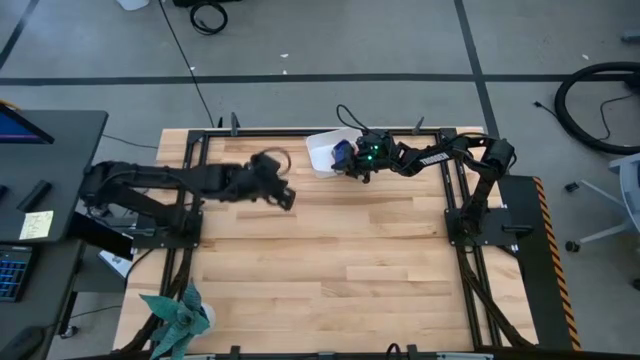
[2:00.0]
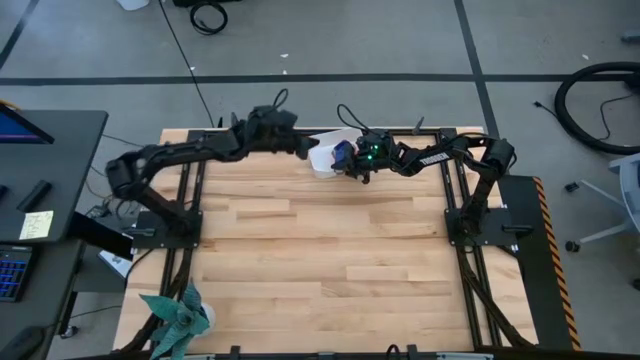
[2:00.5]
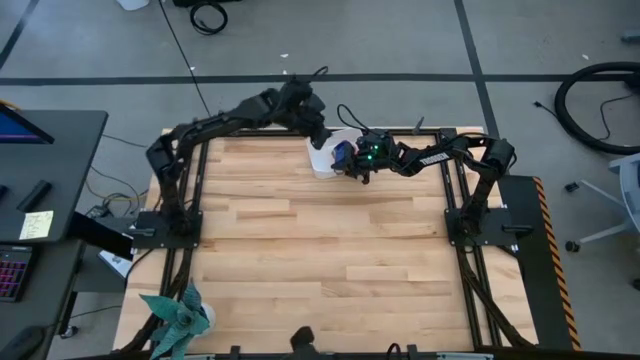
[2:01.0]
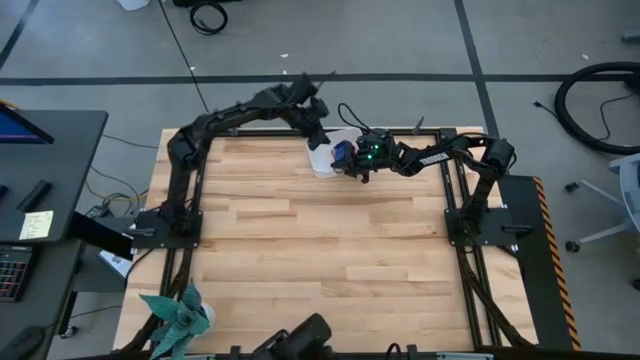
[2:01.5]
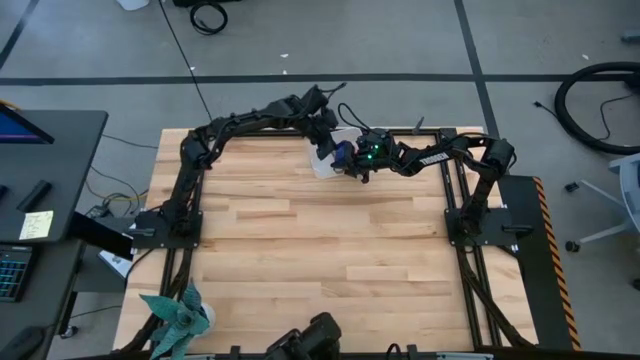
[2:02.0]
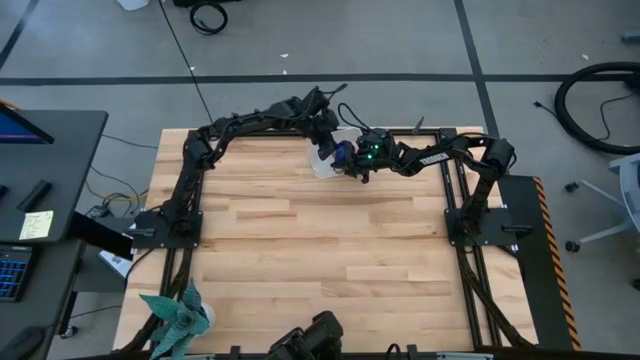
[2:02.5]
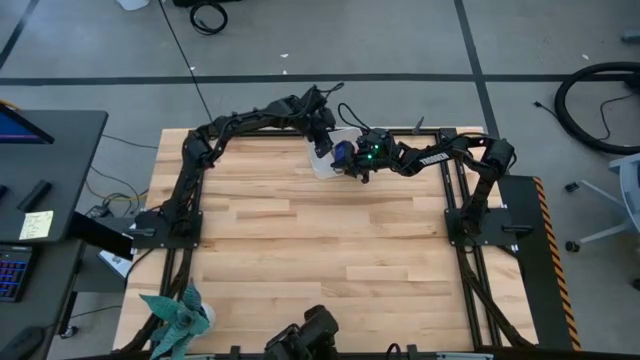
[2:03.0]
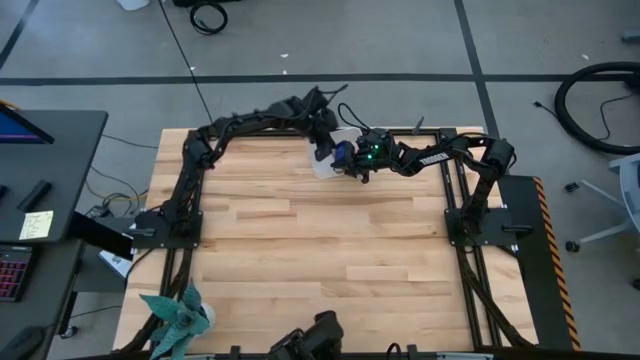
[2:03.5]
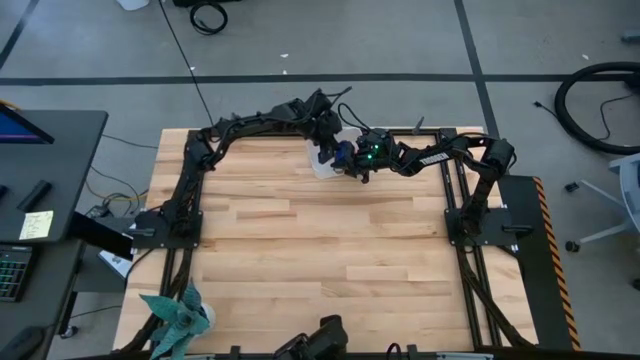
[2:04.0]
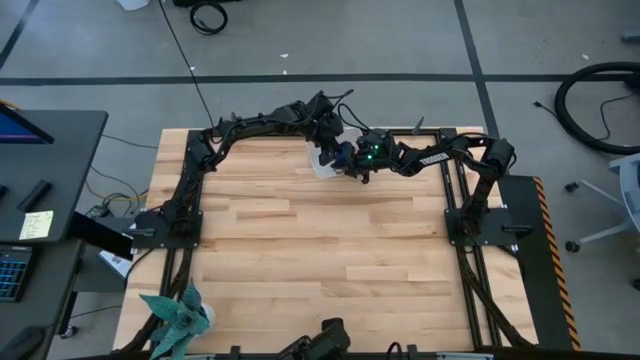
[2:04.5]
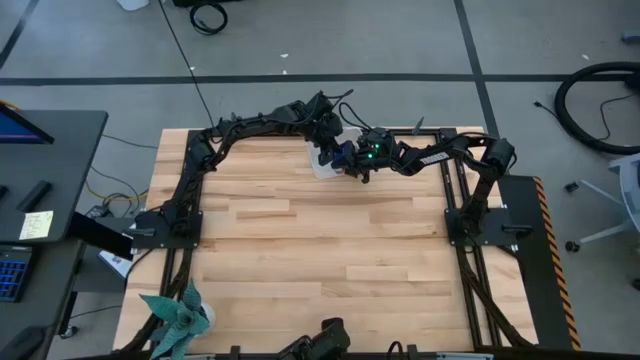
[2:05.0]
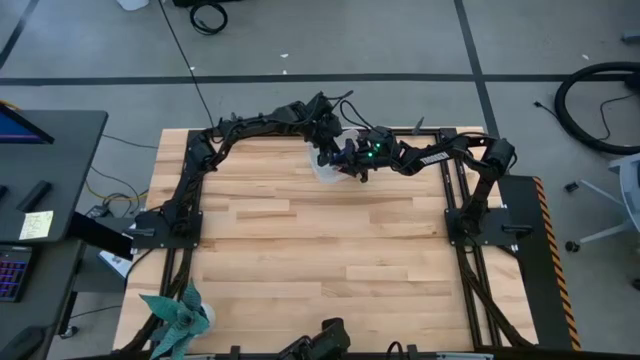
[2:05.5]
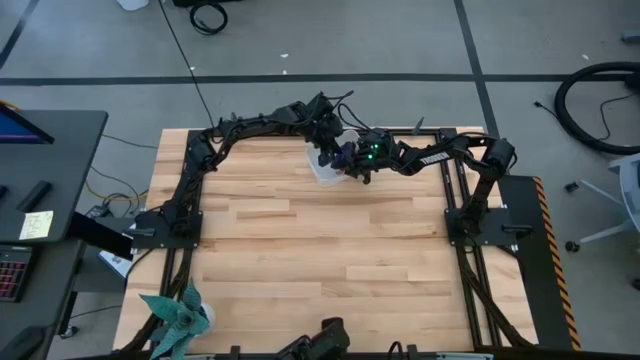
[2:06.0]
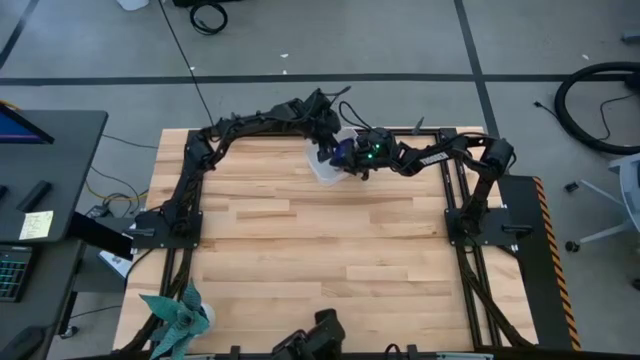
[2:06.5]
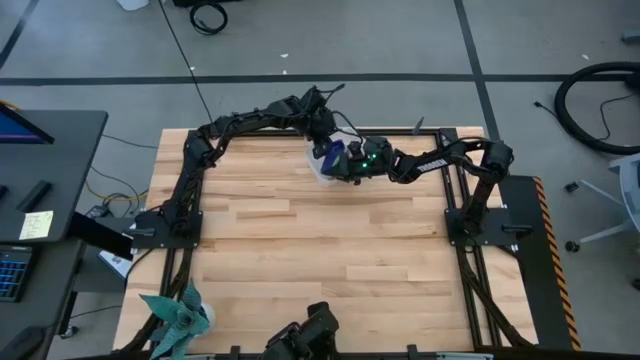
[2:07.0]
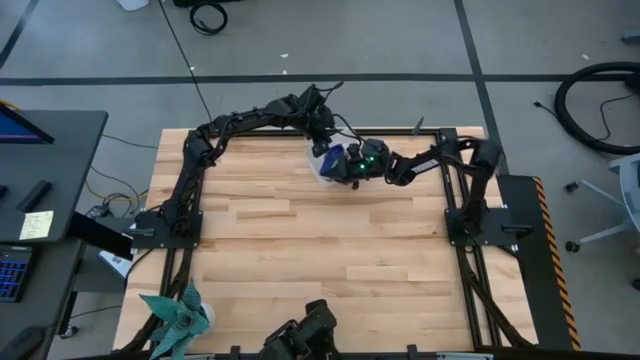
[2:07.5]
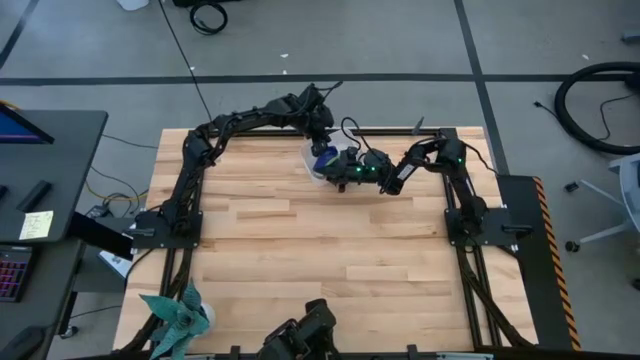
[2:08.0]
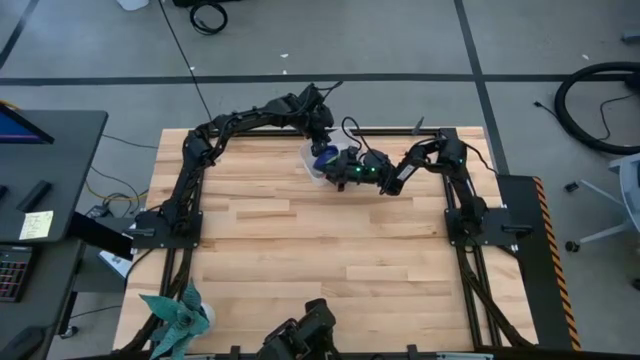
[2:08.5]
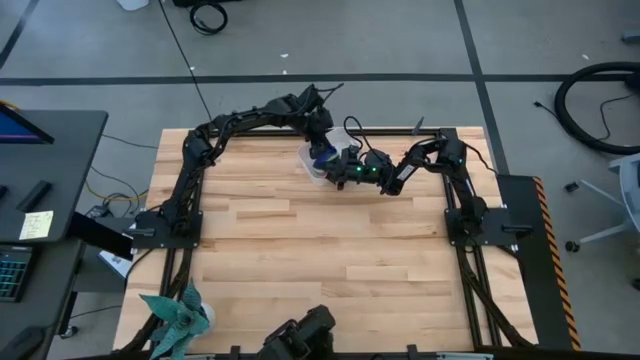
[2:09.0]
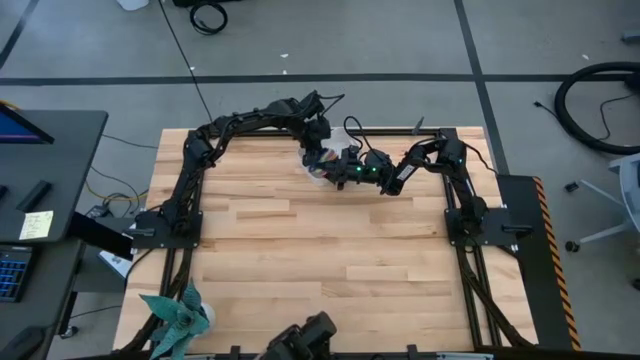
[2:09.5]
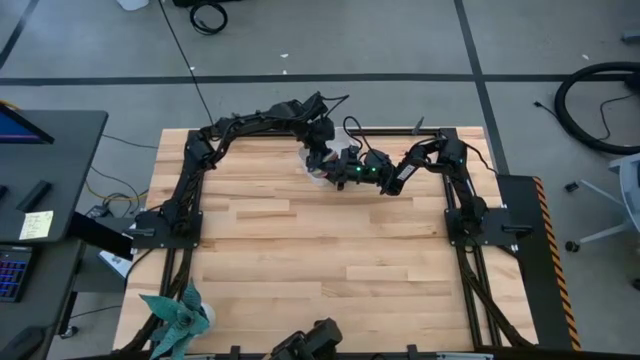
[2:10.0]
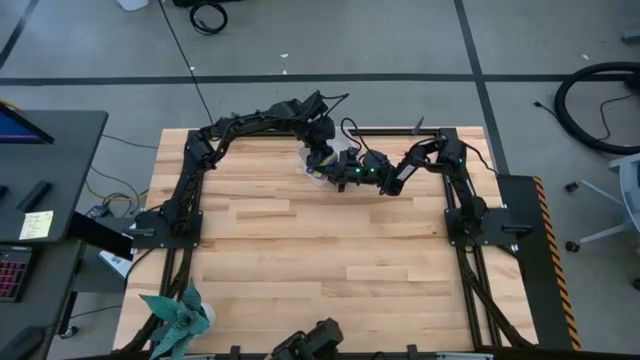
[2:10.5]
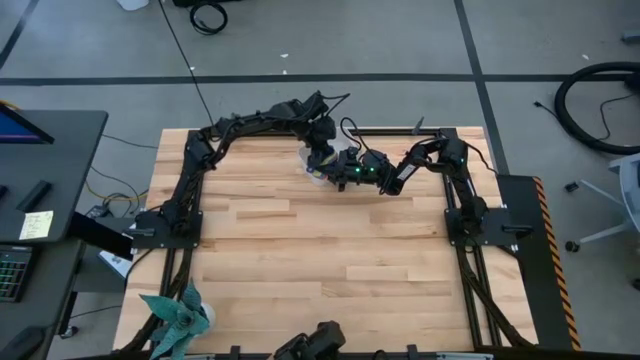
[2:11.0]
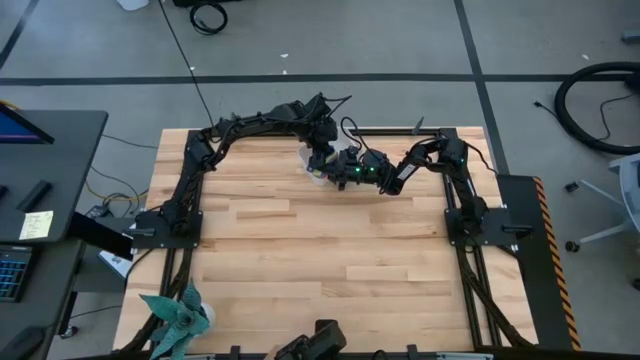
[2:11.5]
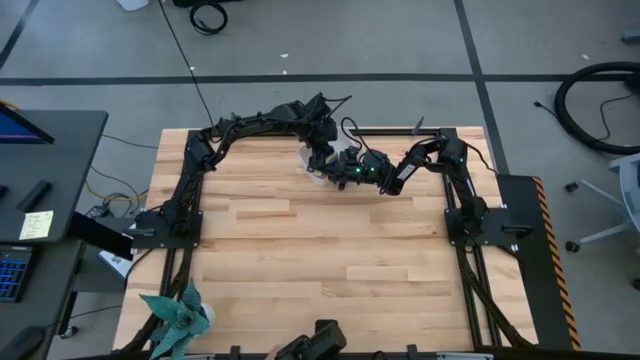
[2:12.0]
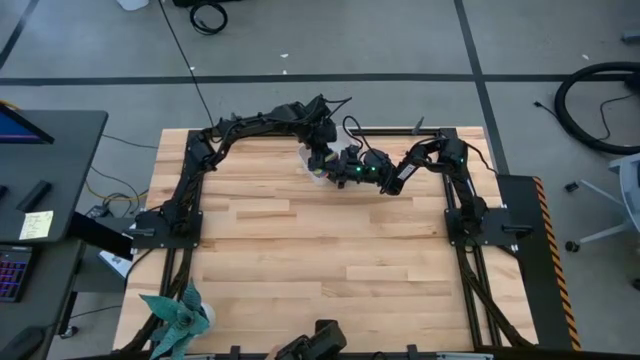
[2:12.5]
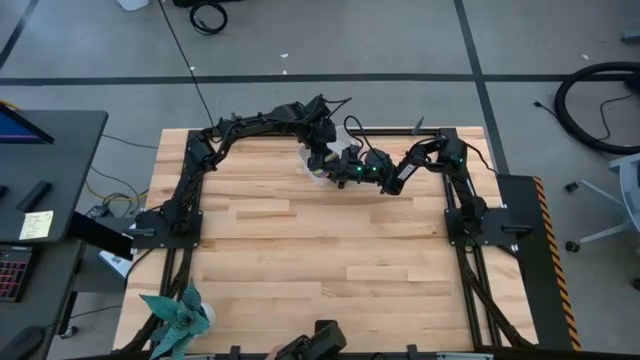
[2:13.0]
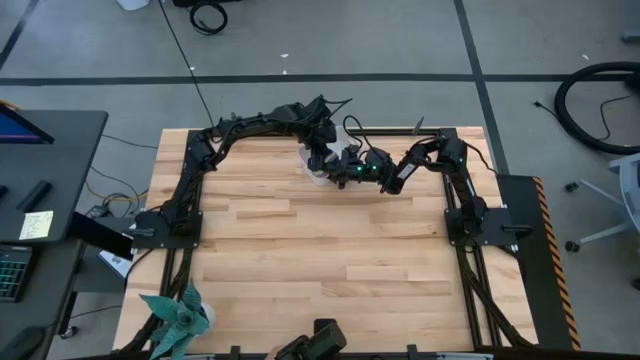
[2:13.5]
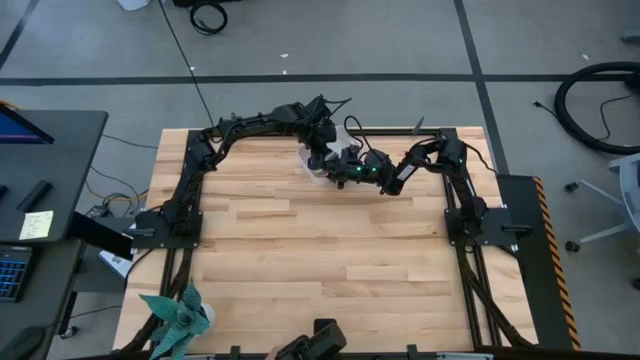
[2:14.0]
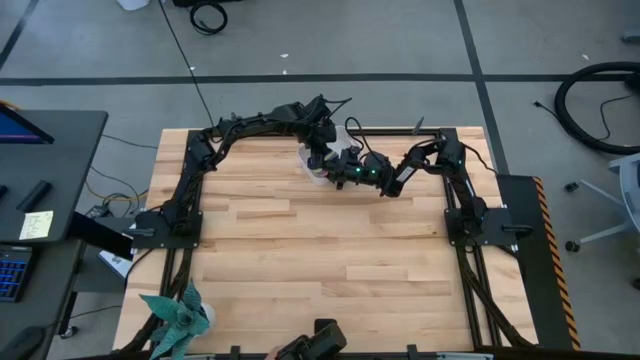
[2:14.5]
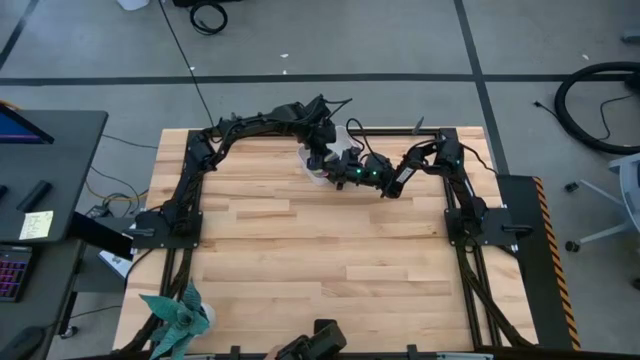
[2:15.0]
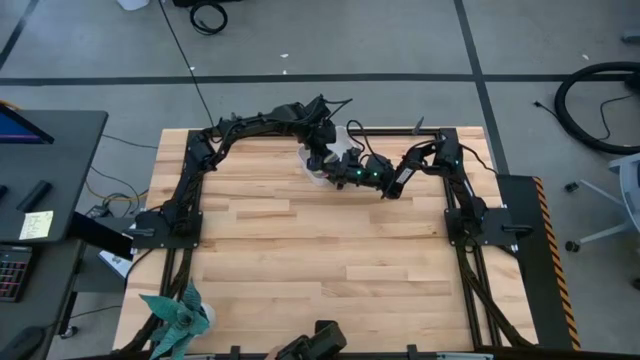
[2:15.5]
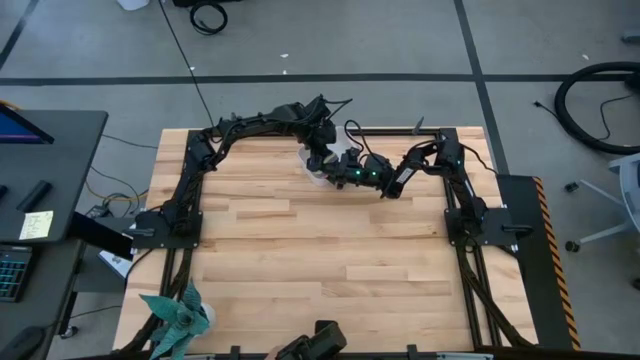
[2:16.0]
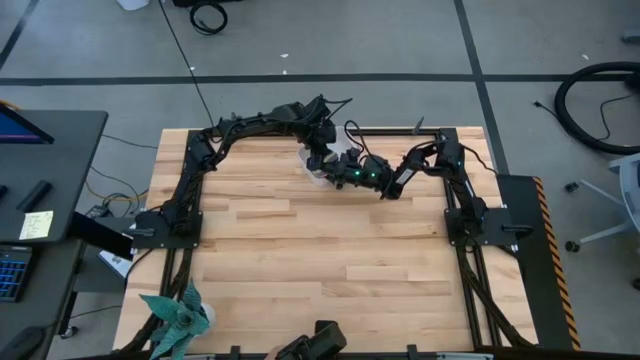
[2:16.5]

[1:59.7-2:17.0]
Task: Nest measuring cups in basket
Put the nested measuring cups into the white bin

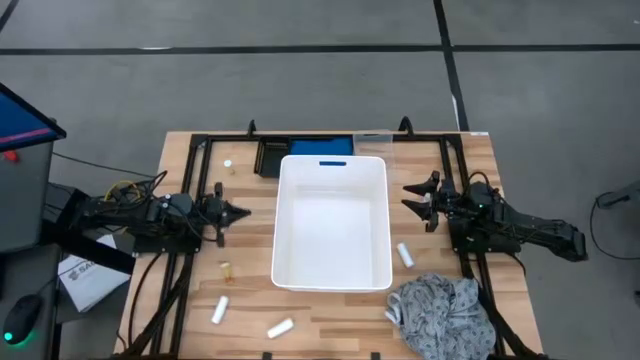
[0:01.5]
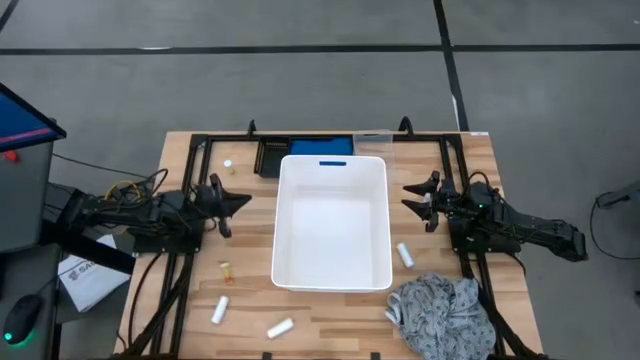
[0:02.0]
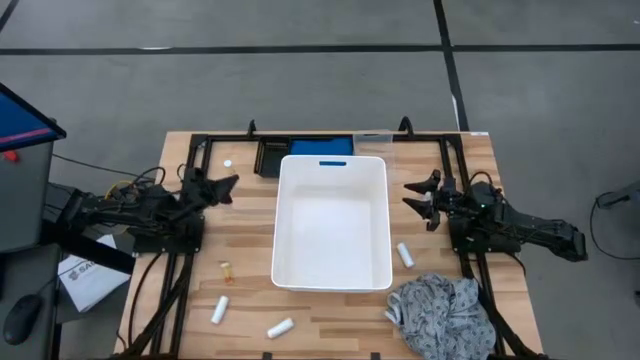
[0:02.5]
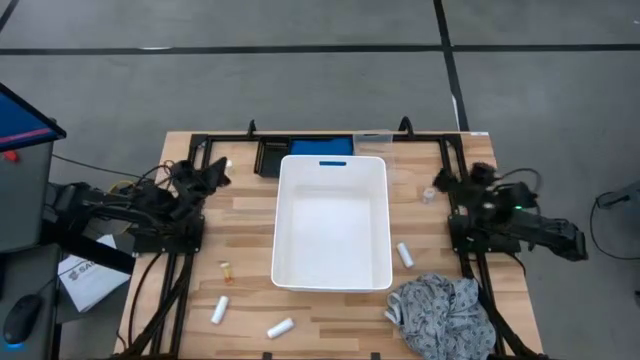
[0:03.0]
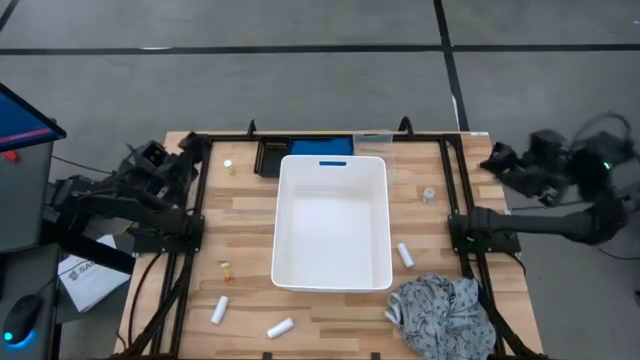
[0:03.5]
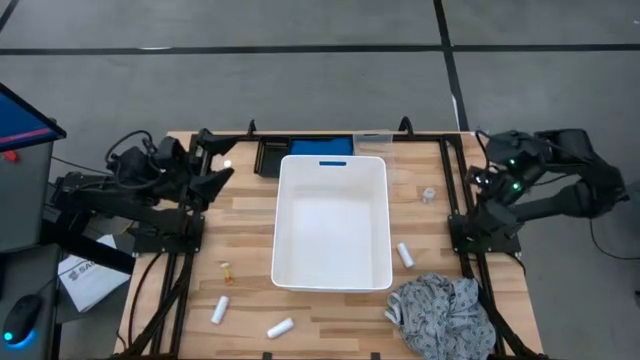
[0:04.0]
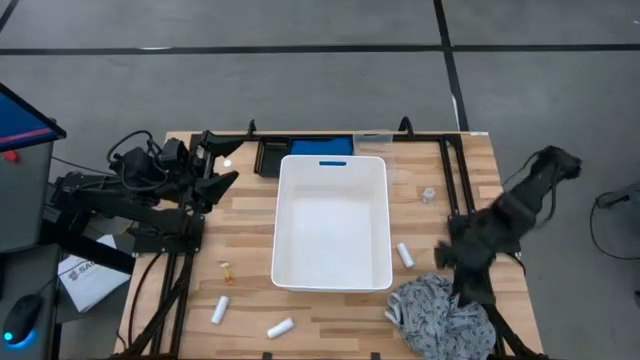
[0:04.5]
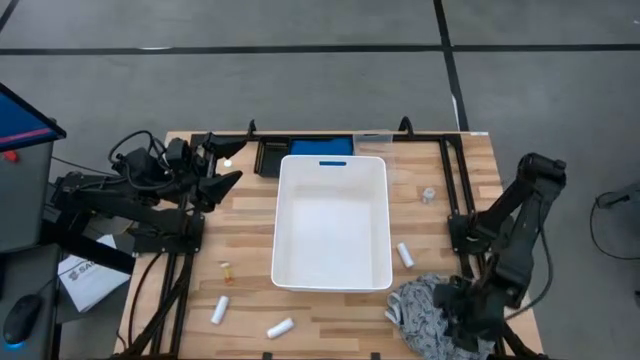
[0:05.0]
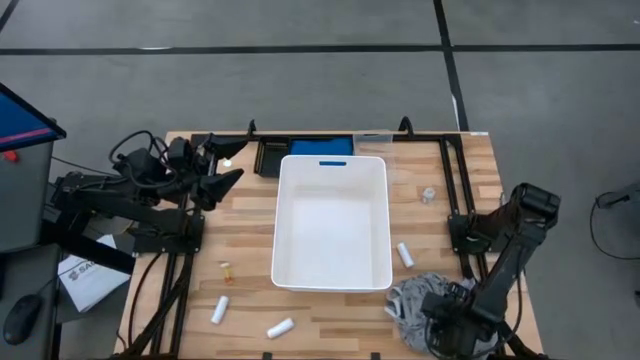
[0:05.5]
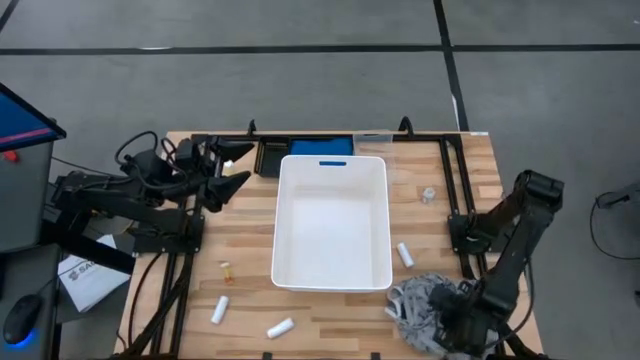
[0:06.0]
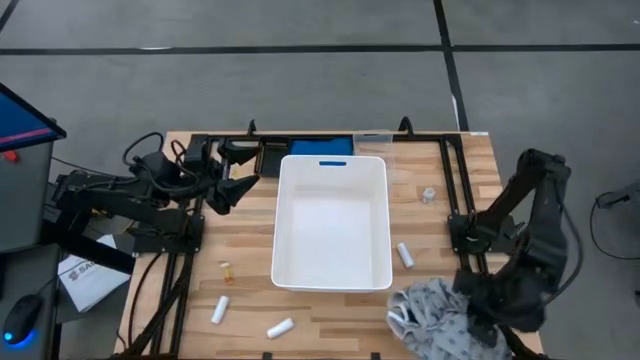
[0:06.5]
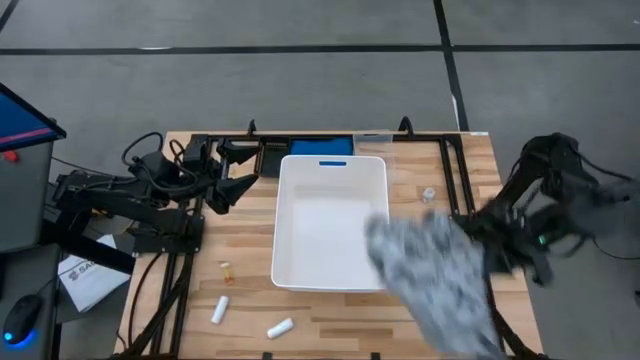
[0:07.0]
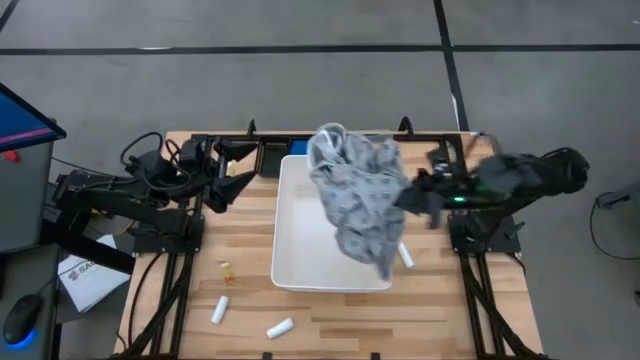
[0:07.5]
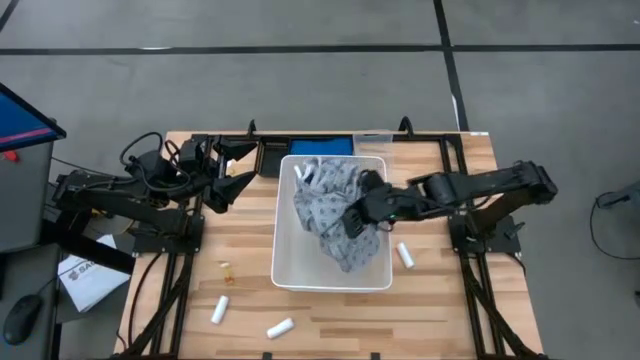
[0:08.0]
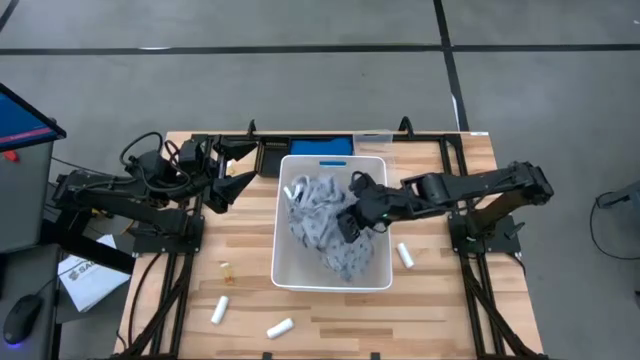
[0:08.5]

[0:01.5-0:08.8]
Task: Pick & place medical supplies in basket/bin
Put the gray patient gown into the white bin
